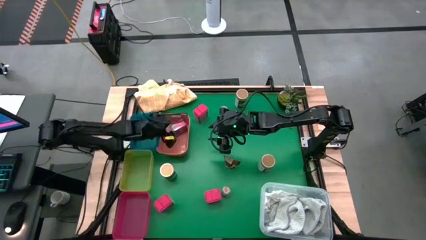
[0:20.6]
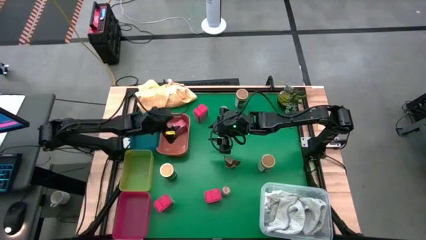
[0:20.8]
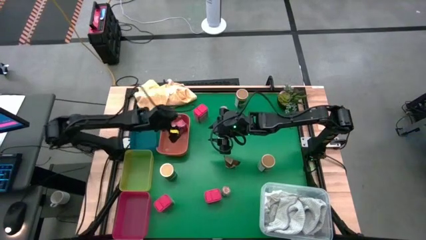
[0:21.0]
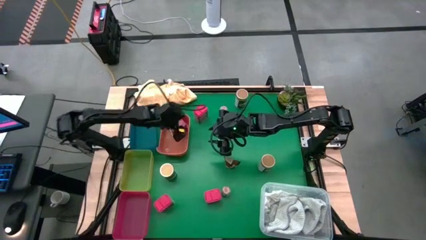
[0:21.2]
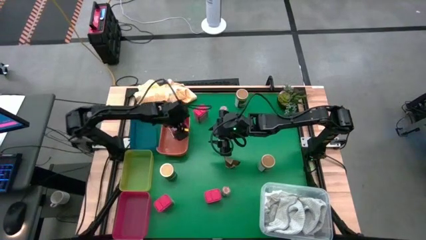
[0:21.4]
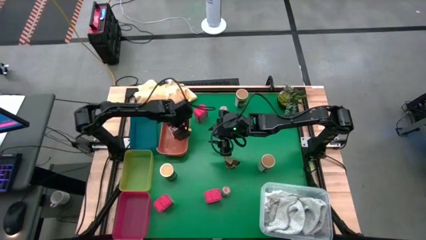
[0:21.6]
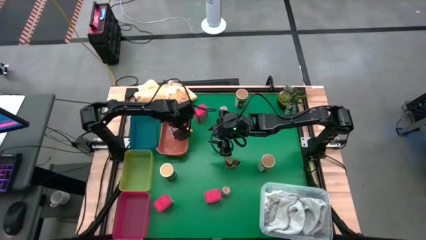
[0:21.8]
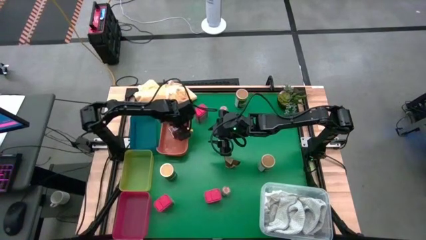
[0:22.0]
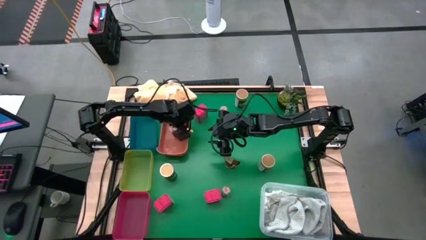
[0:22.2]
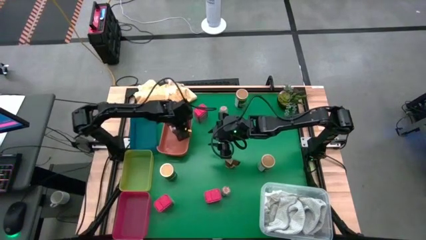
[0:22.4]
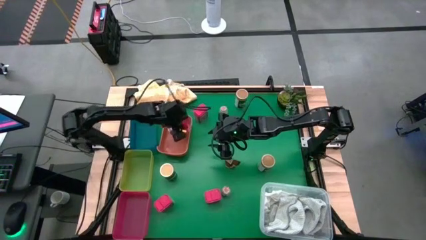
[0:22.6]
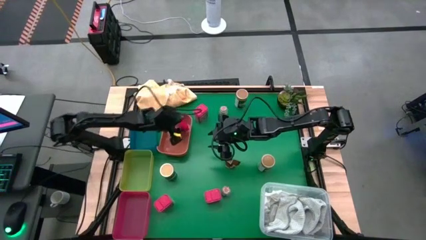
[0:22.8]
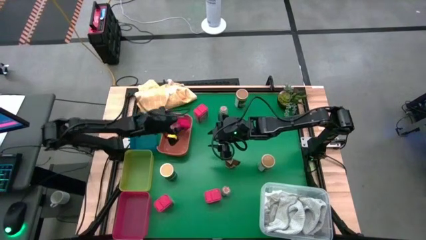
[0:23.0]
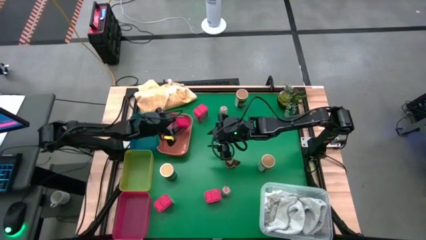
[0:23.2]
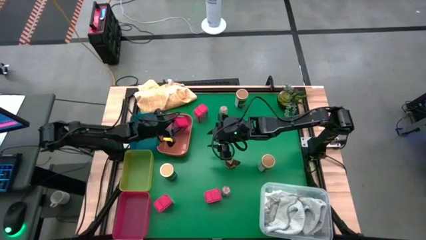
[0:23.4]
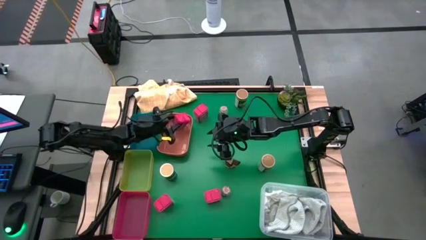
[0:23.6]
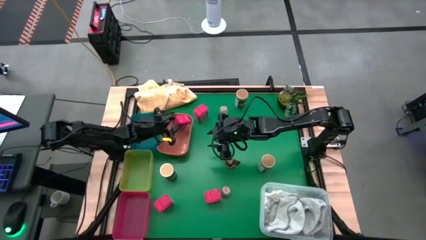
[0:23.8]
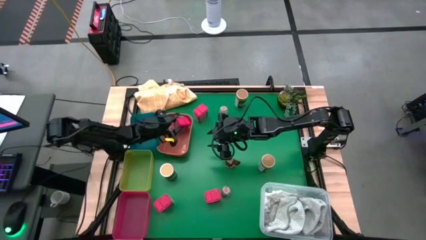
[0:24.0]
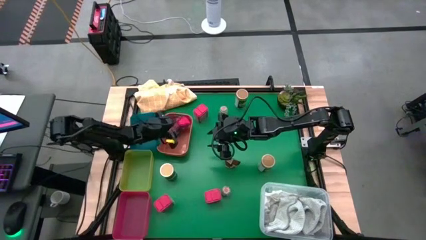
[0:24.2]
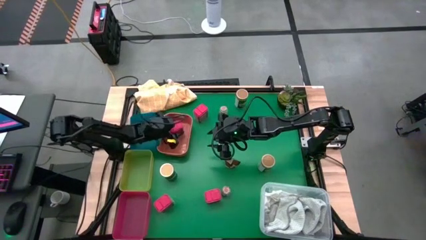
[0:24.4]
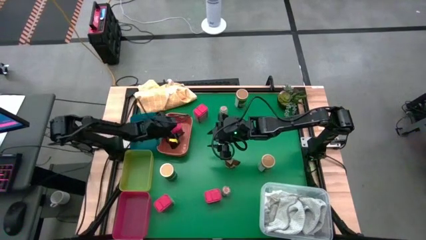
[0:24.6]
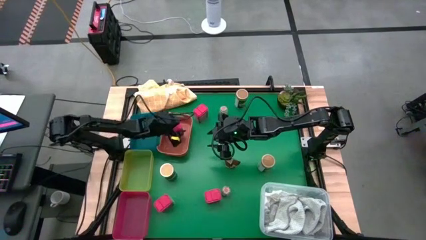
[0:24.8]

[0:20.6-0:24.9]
Task: Sort spices by type
Put the top right red seasoning can into the orange bin

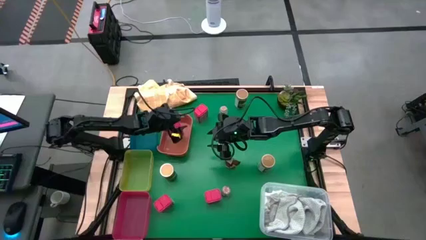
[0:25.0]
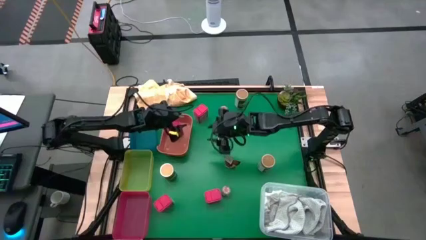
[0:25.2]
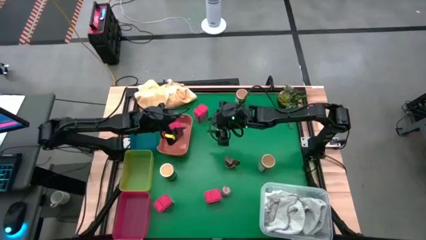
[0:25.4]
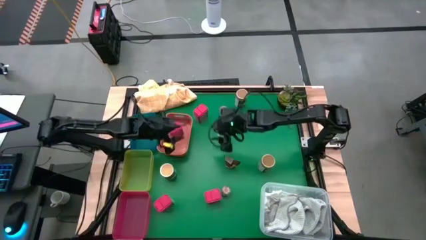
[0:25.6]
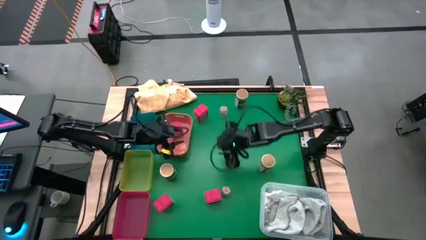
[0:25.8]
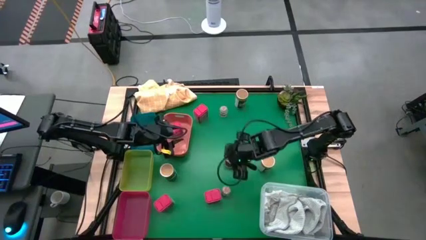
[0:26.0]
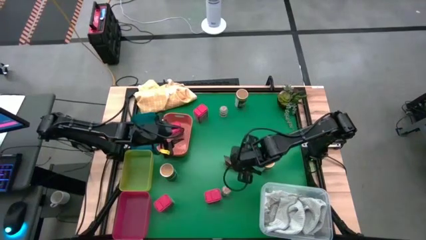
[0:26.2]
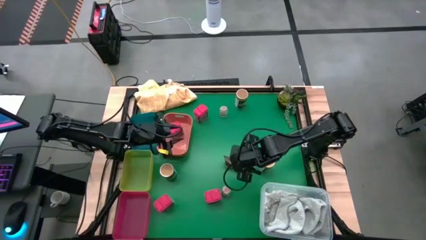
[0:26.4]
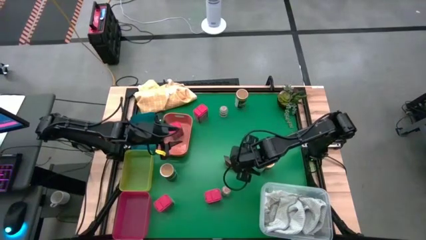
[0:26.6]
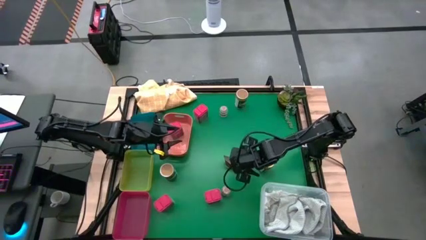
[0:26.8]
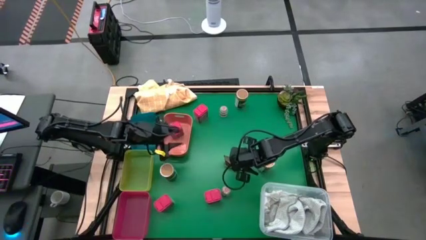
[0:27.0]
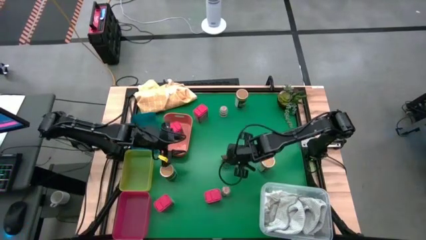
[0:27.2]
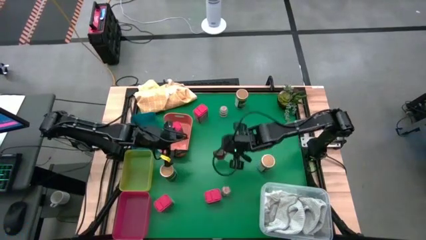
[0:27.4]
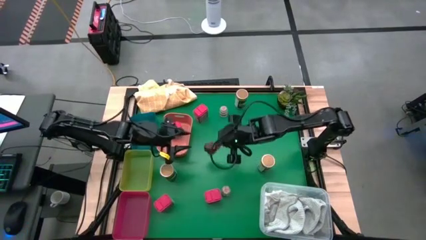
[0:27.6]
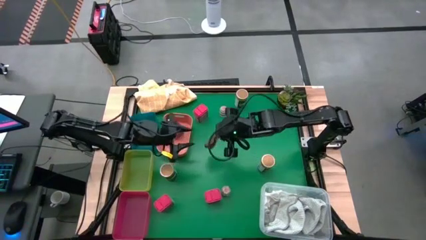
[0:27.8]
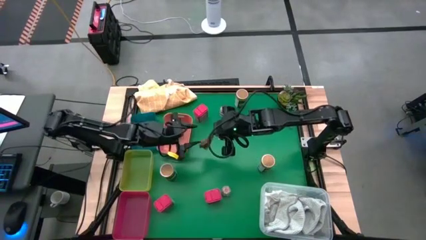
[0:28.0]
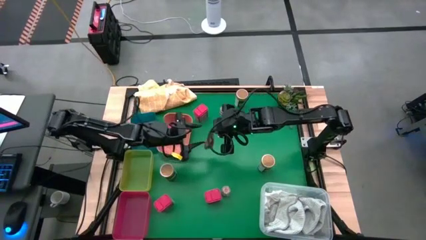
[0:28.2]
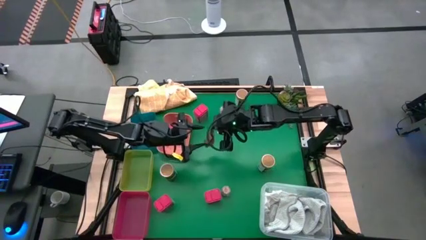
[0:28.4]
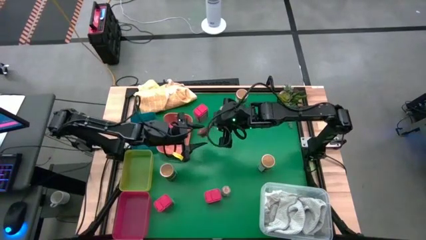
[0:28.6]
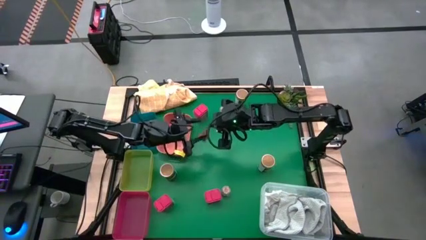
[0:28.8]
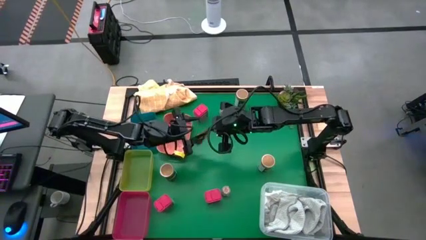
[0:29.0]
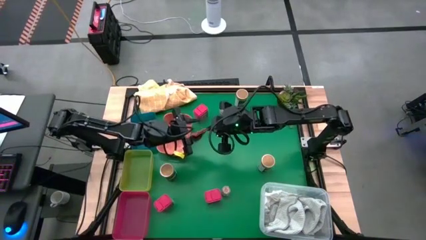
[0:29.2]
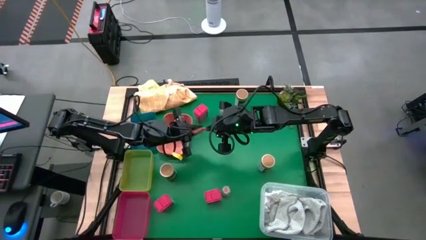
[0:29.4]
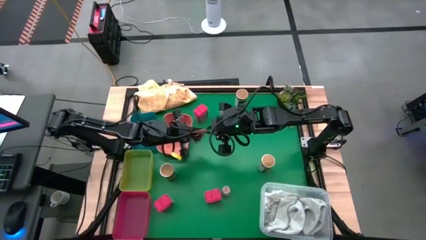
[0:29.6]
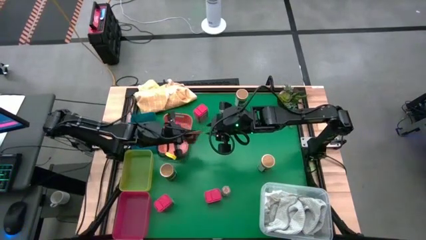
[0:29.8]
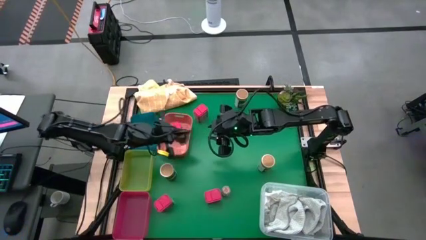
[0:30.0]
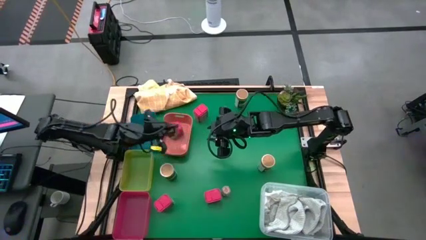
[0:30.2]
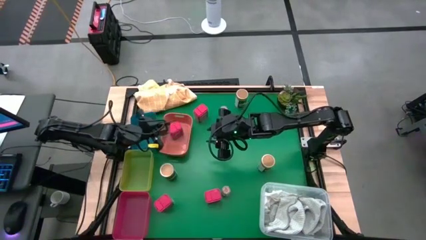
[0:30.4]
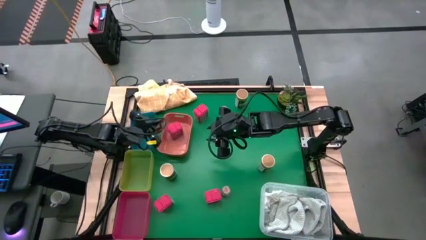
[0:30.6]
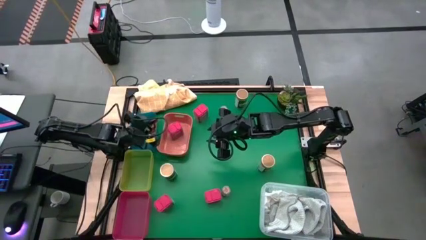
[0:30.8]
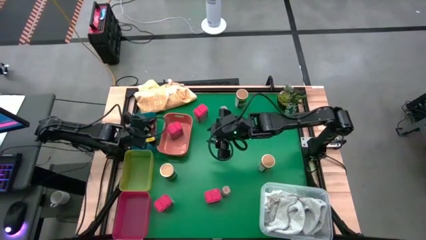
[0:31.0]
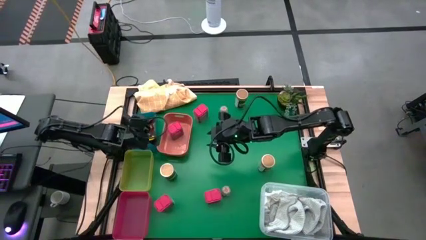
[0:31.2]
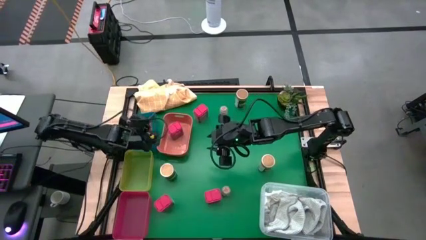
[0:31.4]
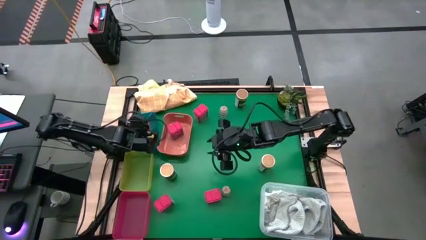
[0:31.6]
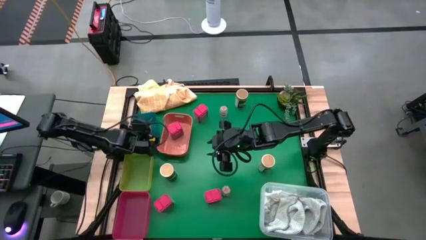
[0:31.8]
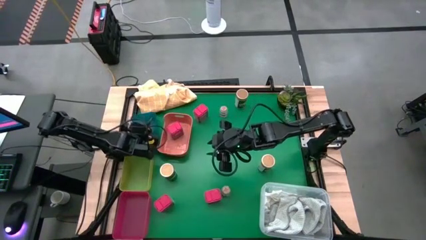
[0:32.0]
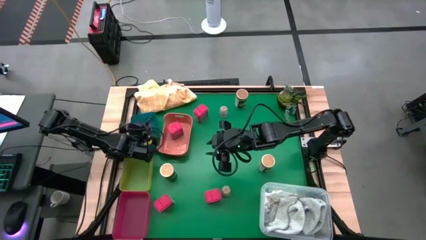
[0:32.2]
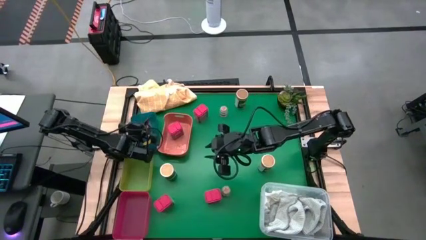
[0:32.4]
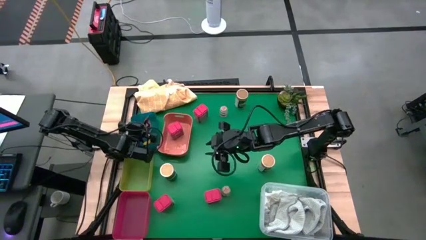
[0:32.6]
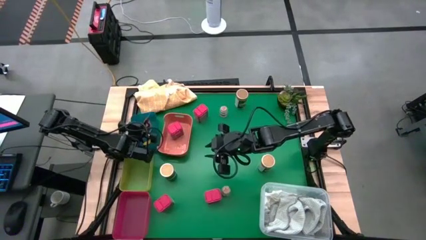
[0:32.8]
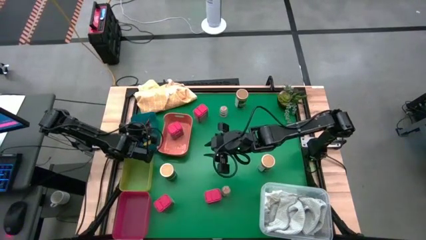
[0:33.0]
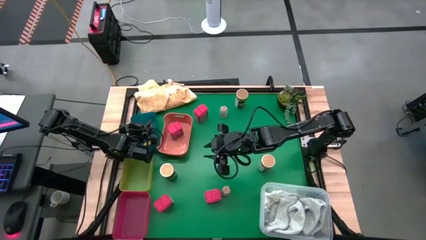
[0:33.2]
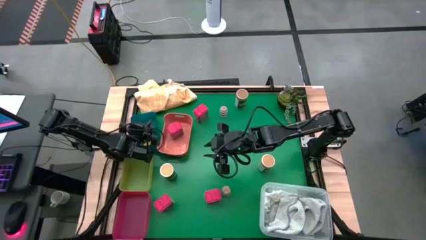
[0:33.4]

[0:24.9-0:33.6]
Put the orange seasoning pack into the blue bin

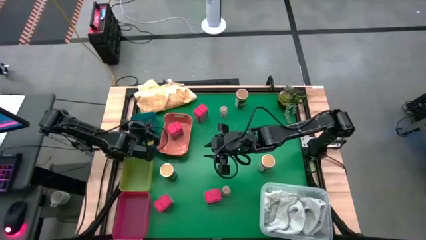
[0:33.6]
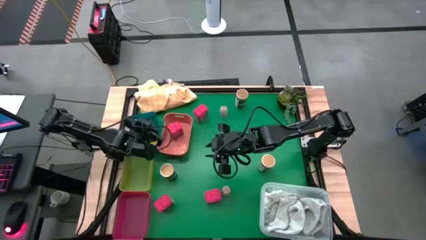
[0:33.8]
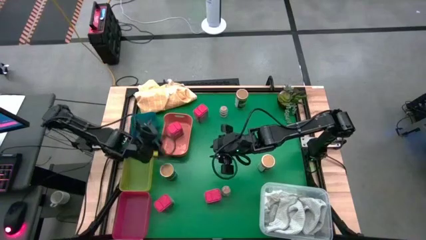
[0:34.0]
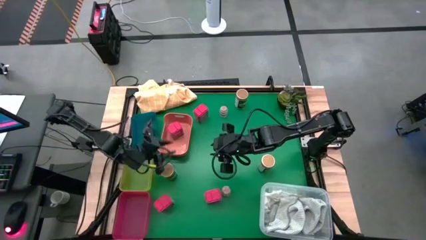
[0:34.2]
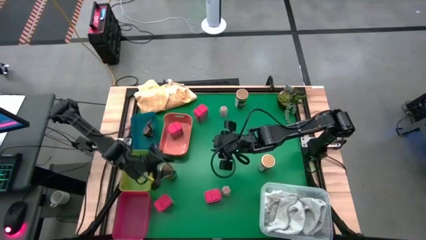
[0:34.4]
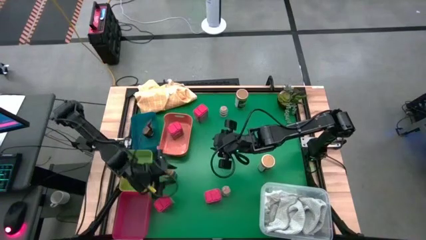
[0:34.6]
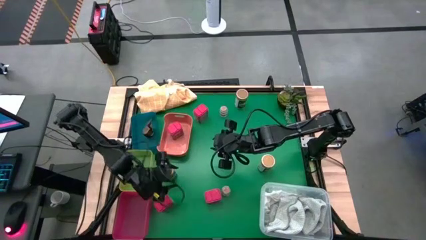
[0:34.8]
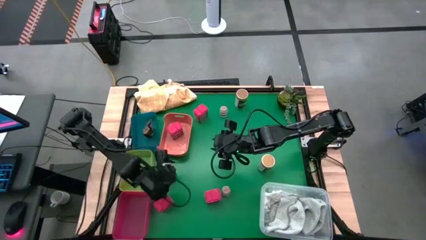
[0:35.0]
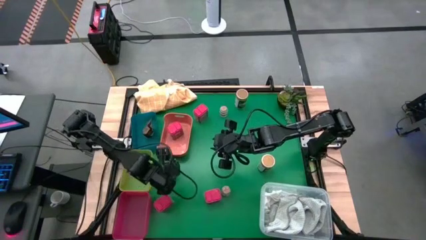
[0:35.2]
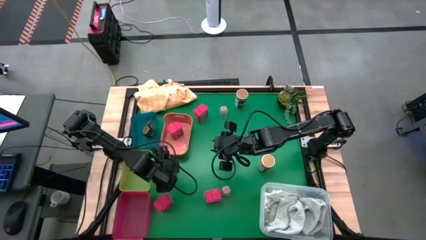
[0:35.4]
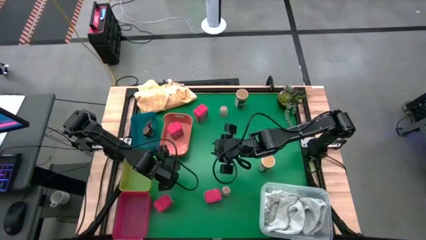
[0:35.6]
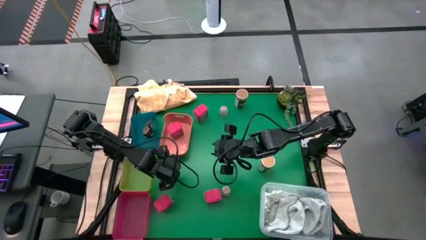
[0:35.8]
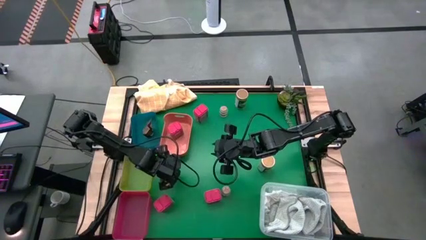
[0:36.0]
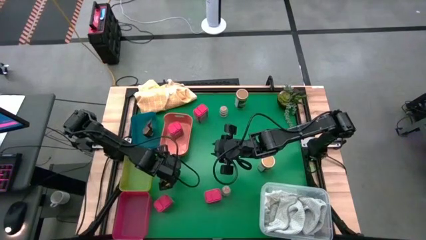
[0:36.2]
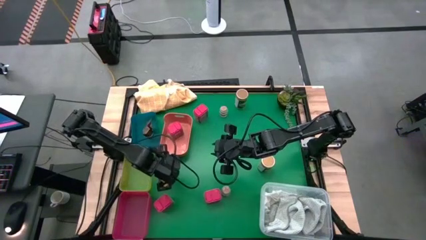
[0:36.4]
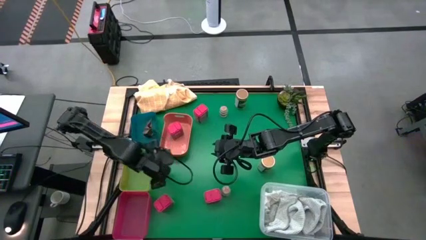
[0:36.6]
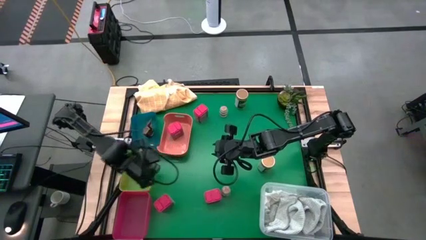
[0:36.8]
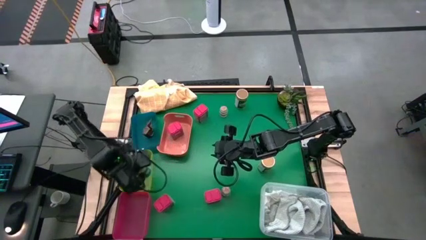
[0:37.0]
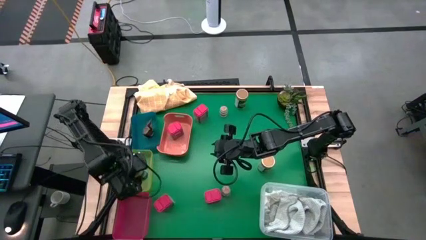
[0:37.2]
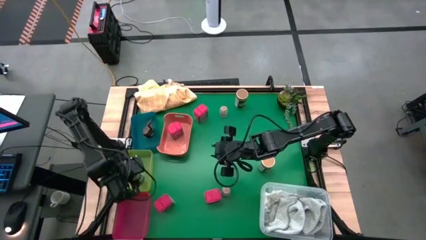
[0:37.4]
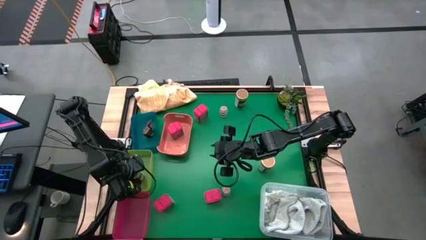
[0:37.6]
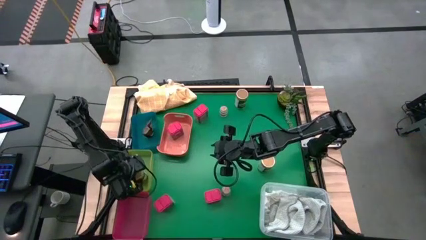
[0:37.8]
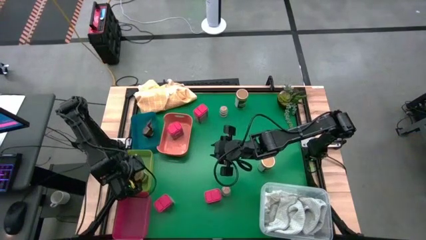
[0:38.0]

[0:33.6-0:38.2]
Put the bottom left gold seasoning bottle into the yellow bin
